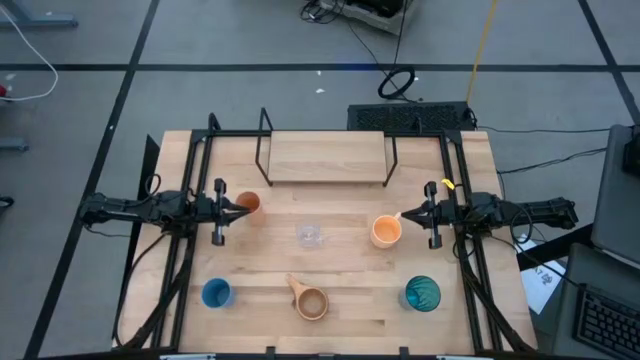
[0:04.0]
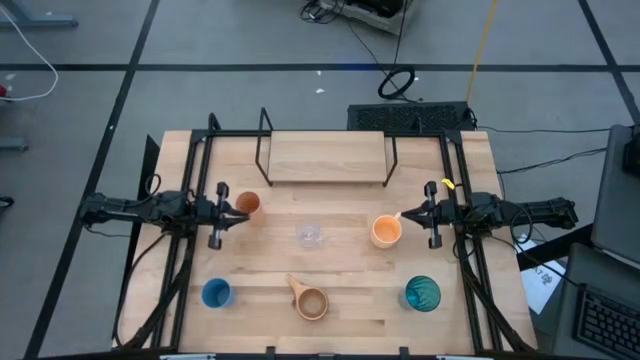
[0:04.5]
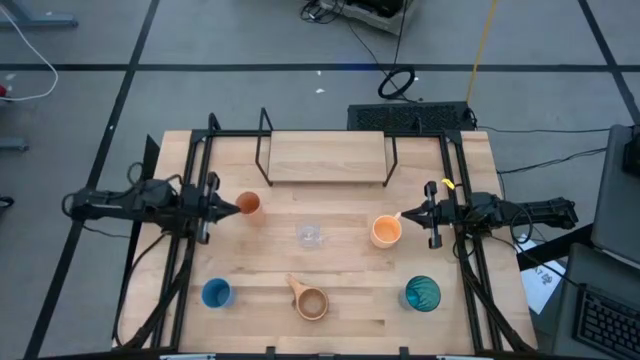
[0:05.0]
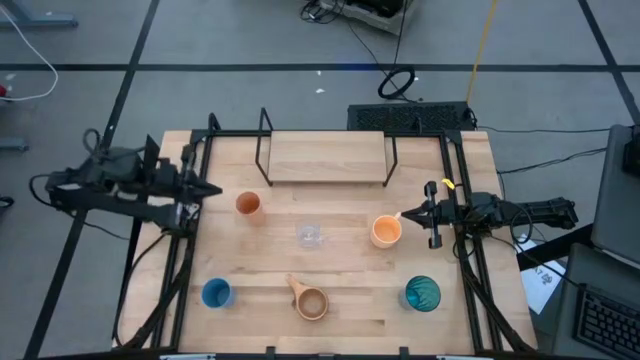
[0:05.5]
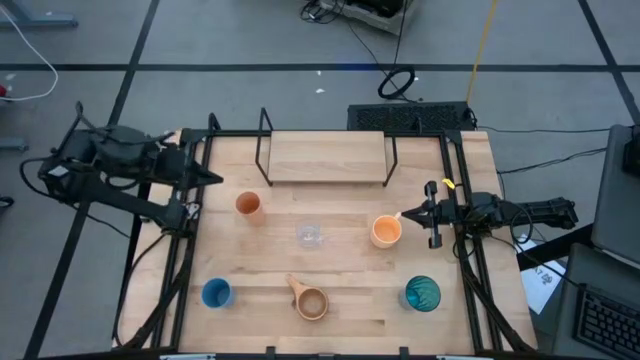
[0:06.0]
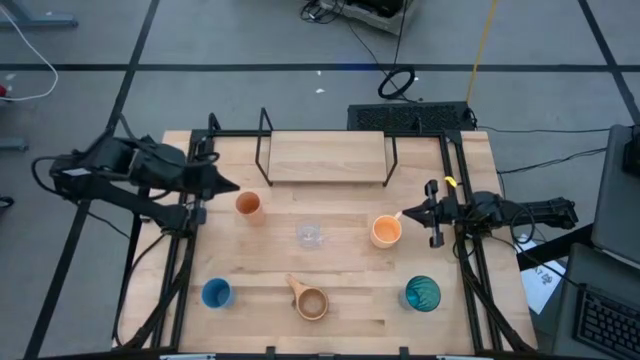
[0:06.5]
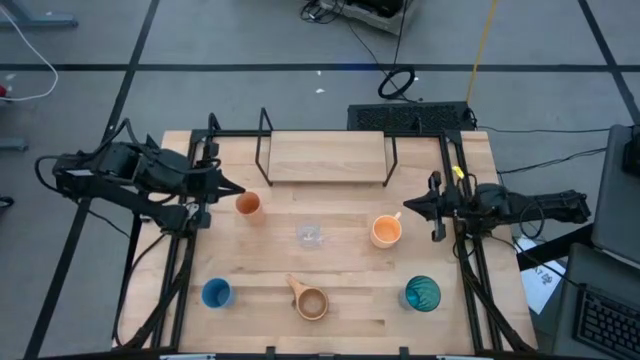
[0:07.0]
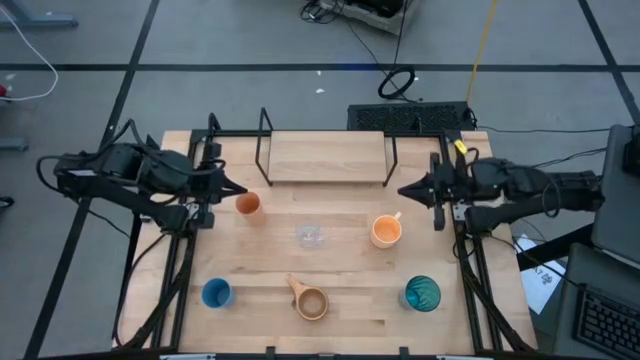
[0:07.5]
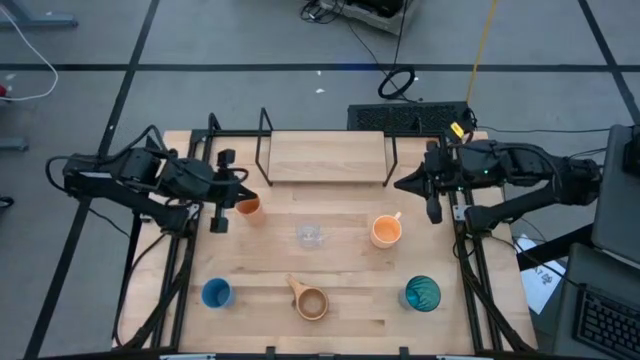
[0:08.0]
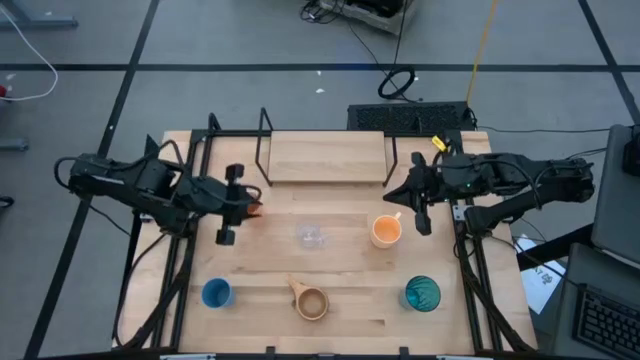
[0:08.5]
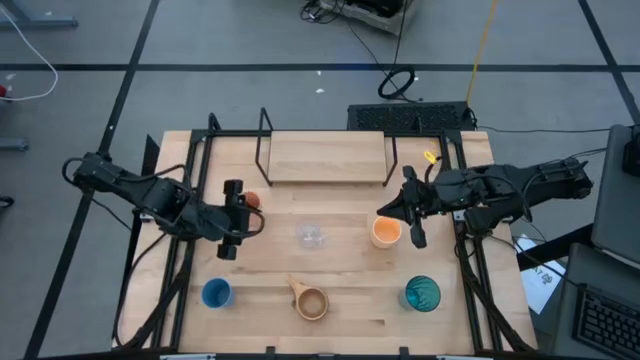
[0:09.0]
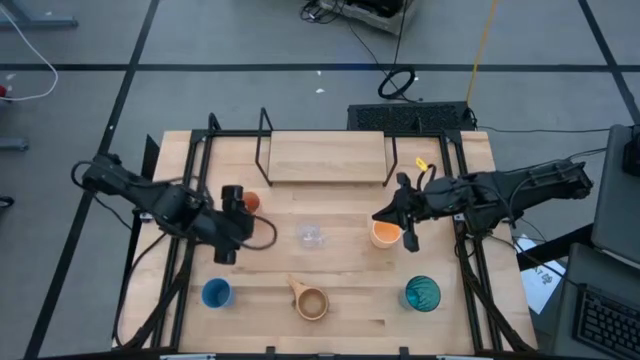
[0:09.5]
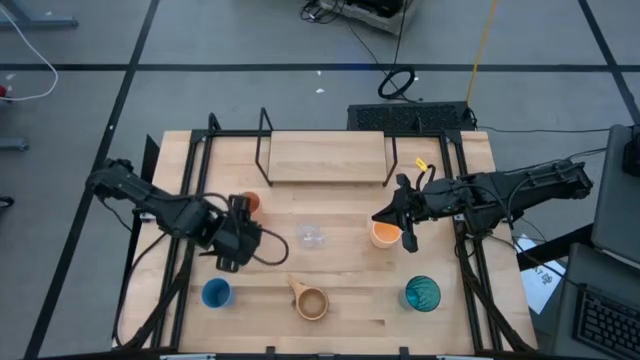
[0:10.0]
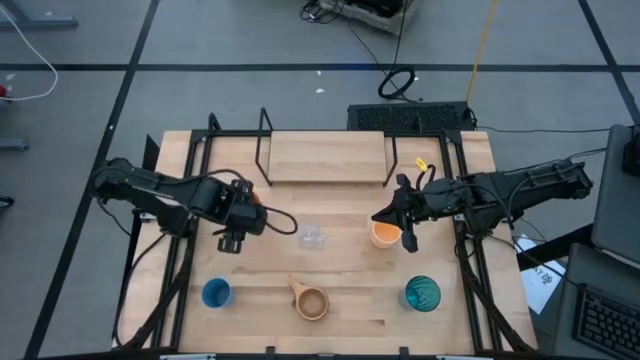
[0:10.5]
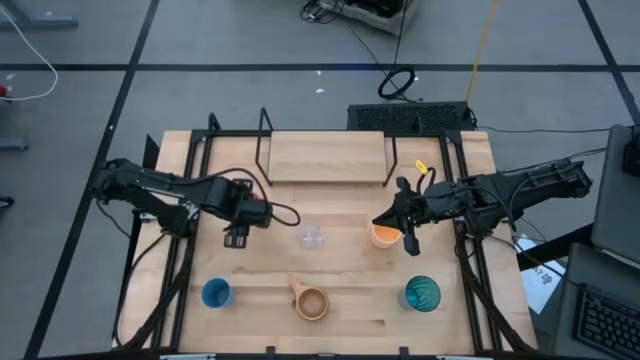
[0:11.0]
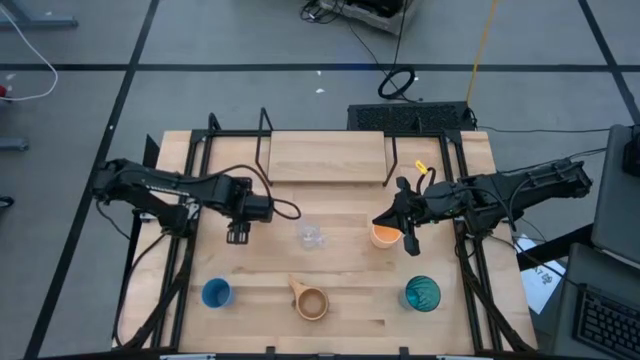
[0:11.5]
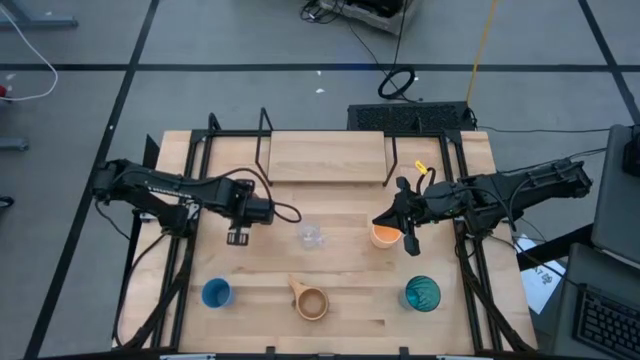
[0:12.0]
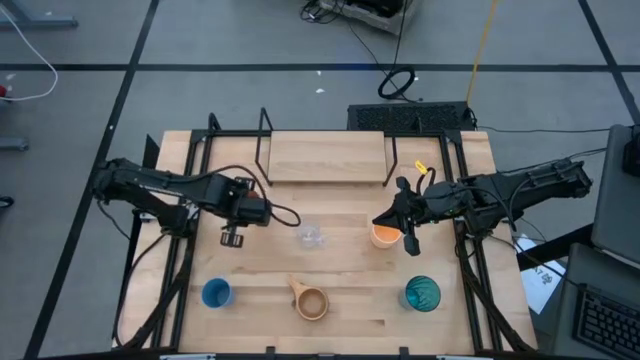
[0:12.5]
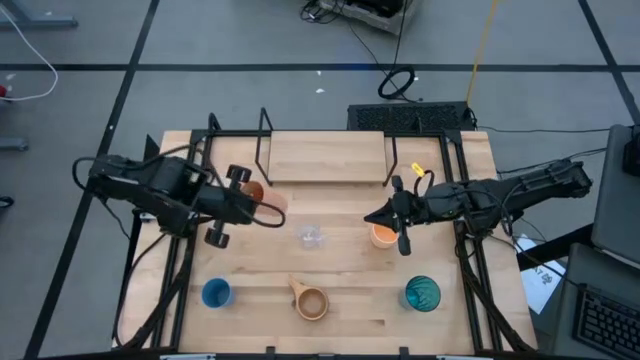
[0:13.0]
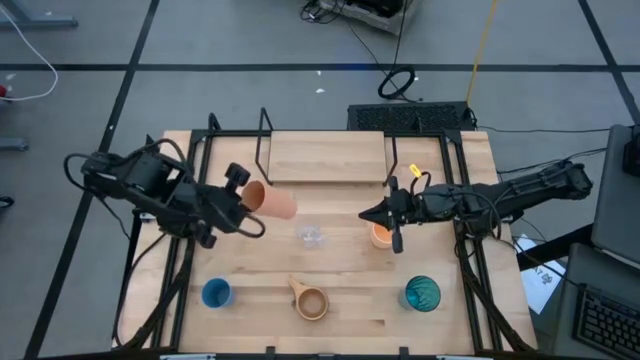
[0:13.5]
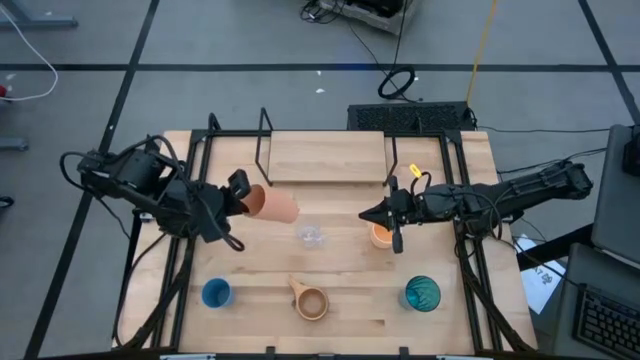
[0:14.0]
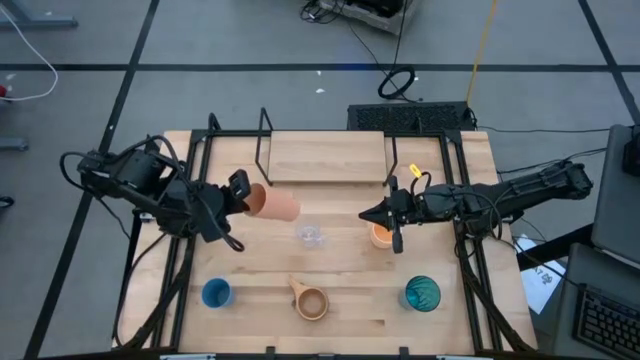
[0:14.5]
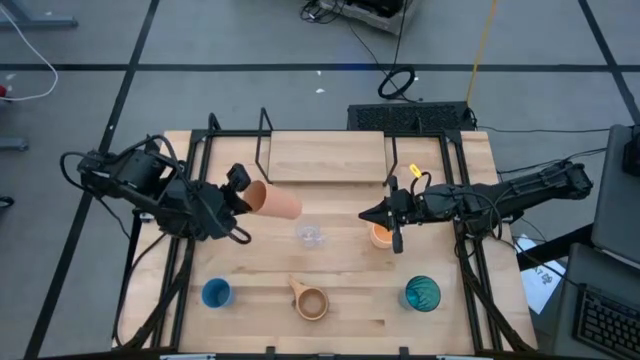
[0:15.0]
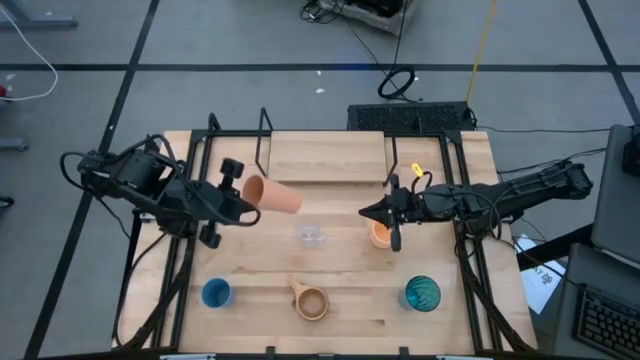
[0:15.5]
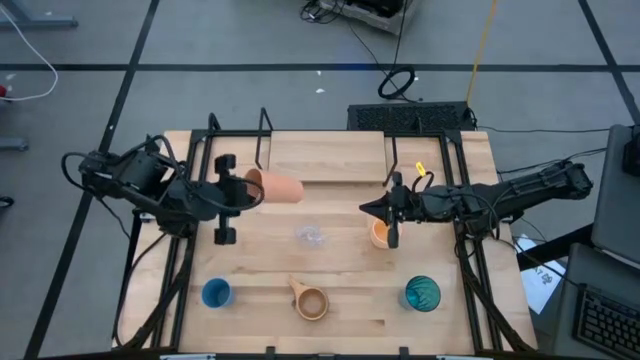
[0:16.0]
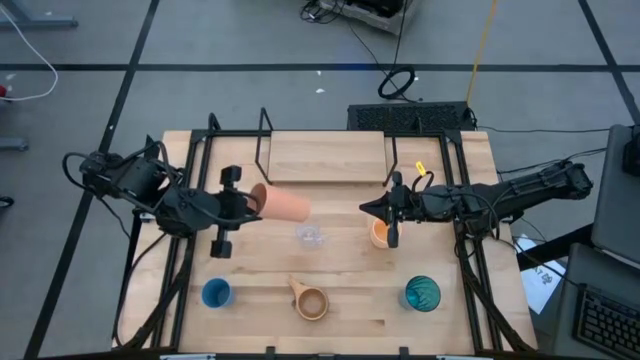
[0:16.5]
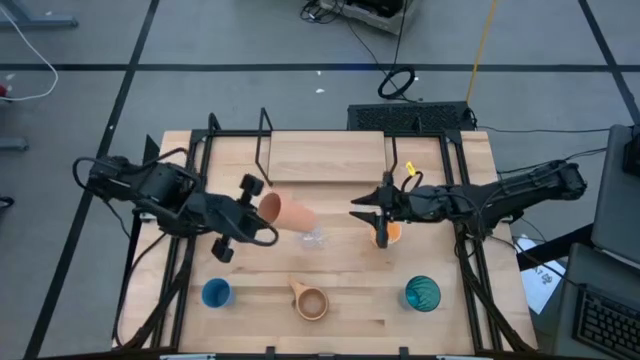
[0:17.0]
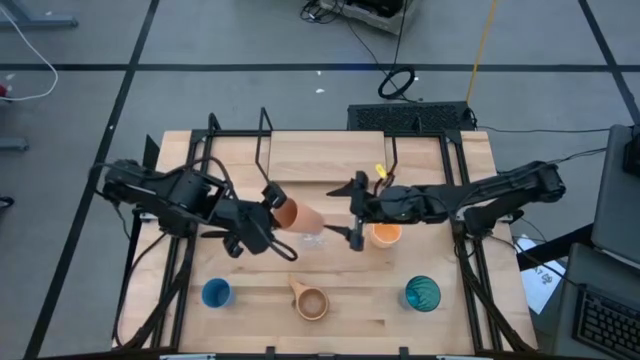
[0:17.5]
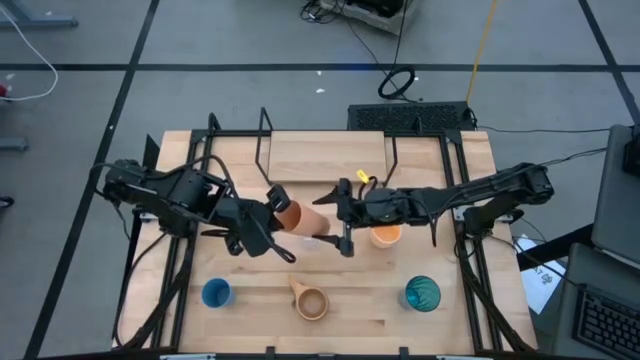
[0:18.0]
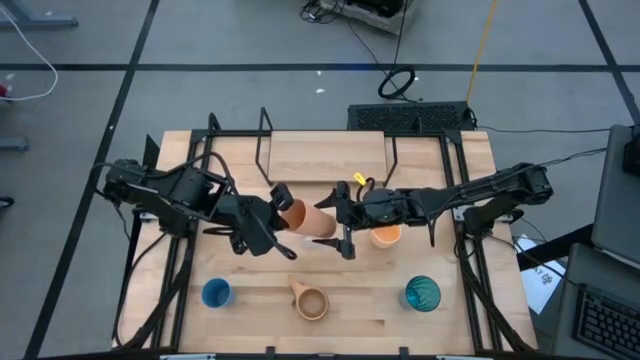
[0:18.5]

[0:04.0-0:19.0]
Task: Stack small to large cups/mugs on shelf
Put the light orange cup on the shelf

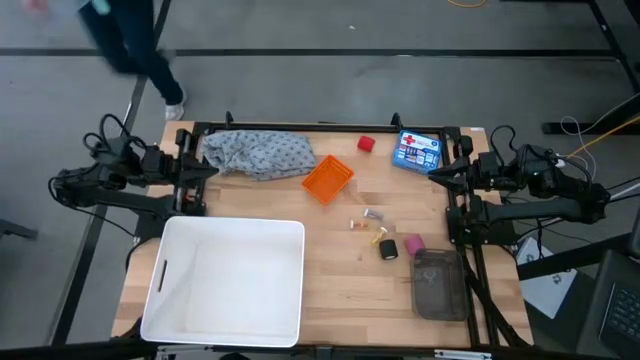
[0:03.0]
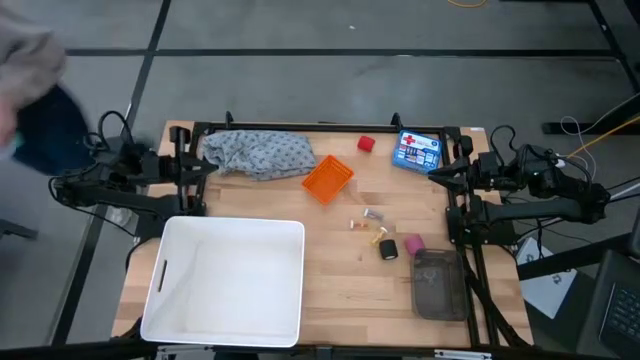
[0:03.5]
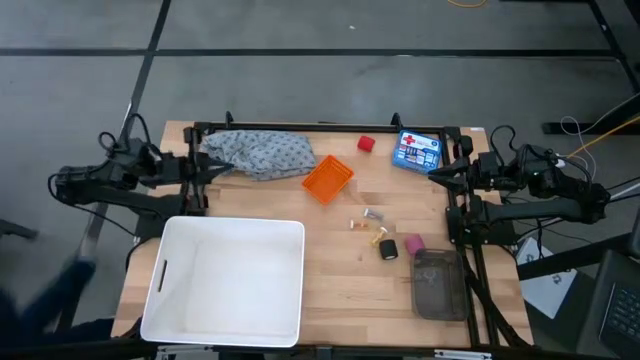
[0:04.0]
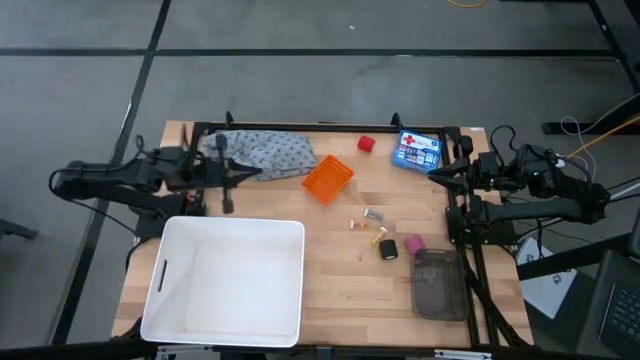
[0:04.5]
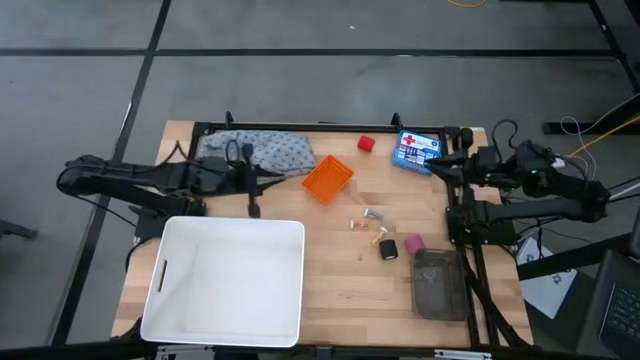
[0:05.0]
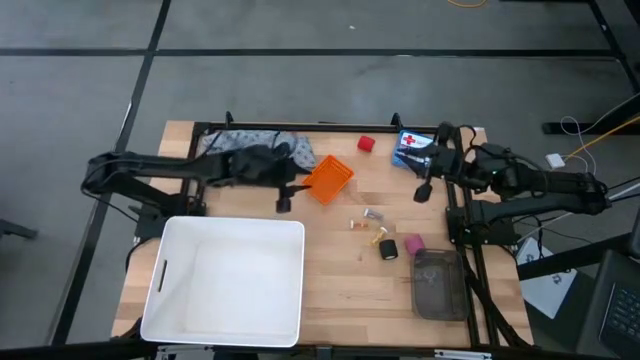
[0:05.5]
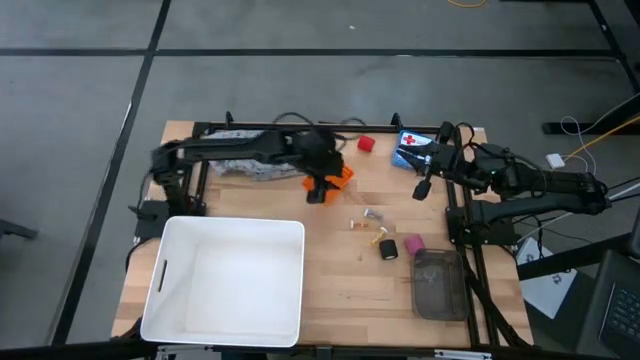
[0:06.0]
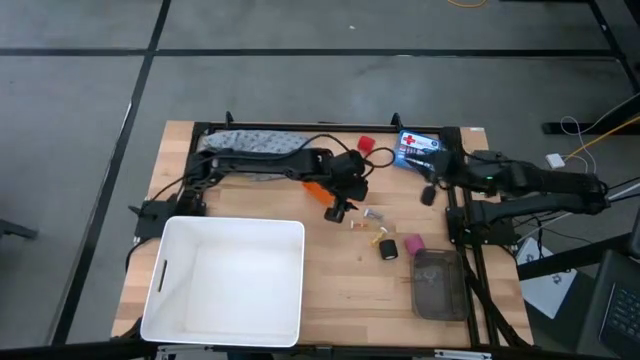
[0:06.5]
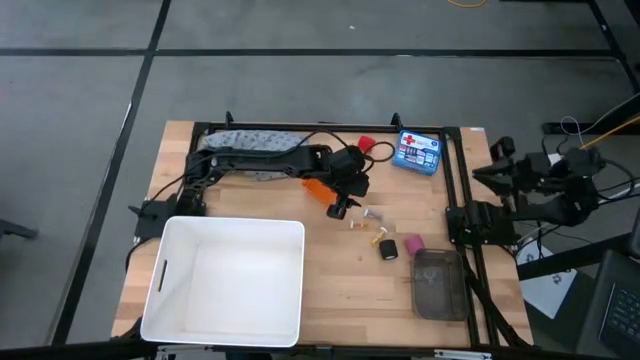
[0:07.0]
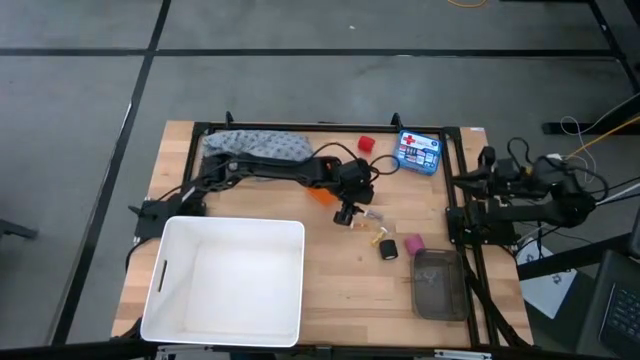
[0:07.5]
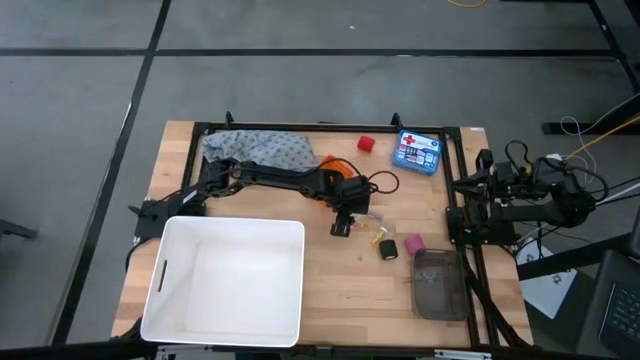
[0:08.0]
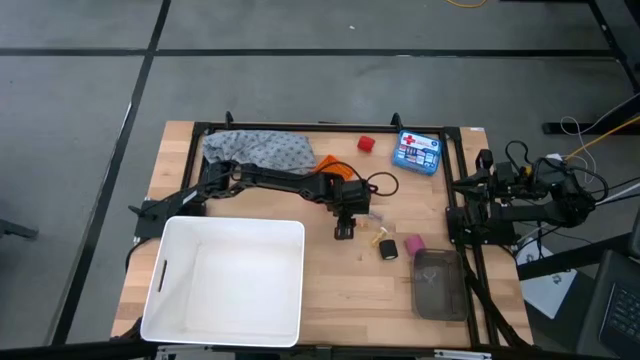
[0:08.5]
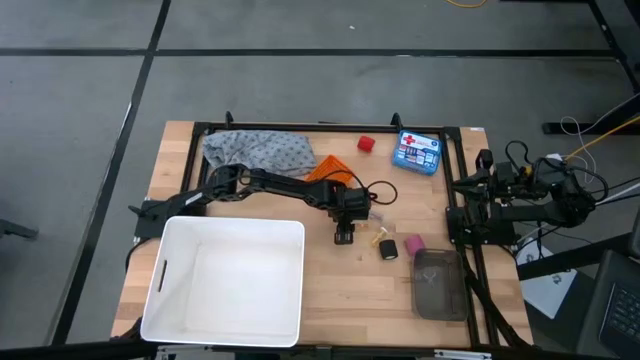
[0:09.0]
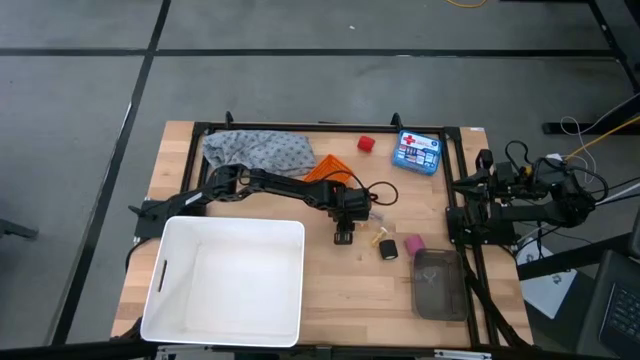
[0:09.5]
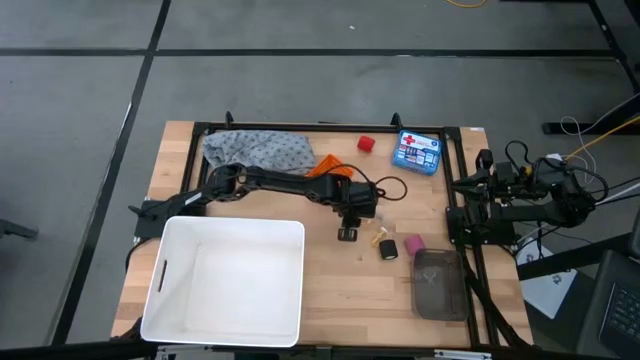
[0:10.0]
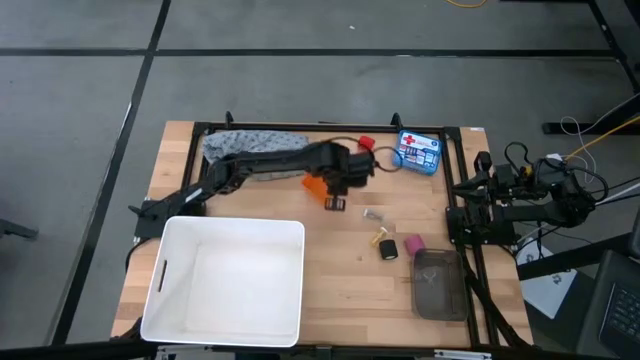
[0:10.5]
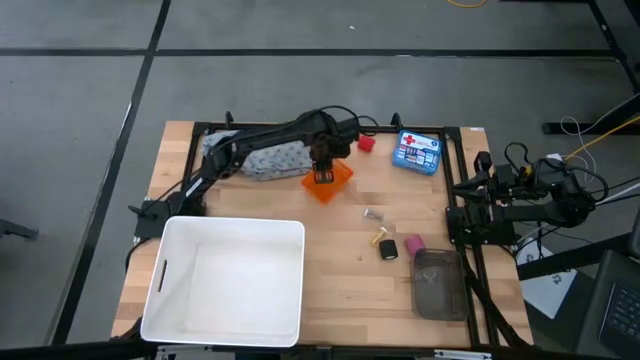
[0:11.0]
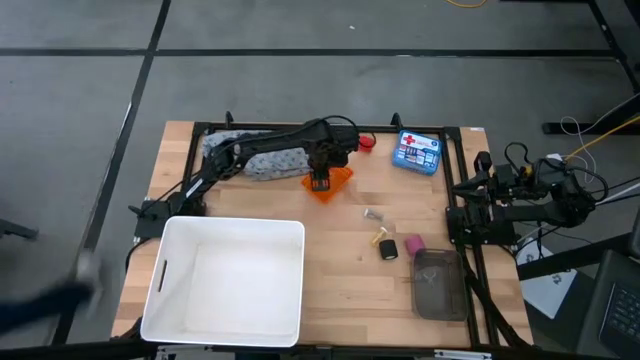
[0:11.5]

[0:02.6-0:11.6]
Task: Pick & place medical supplies in basket/bin
Put the left yellow pill bottle into the orange bin
